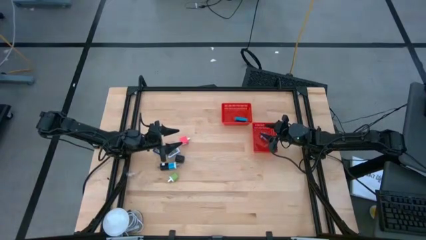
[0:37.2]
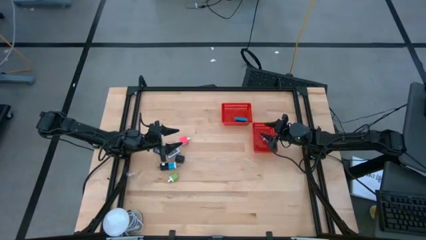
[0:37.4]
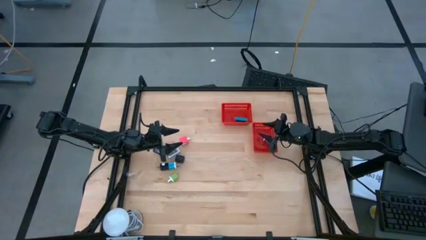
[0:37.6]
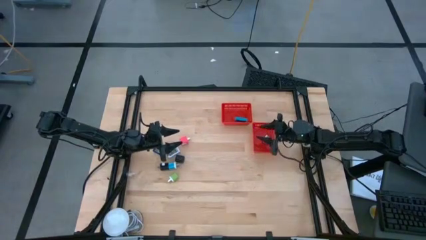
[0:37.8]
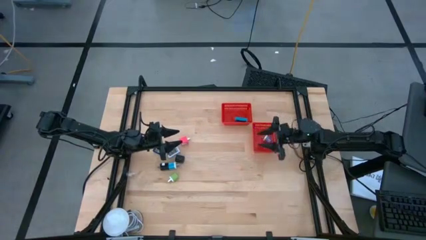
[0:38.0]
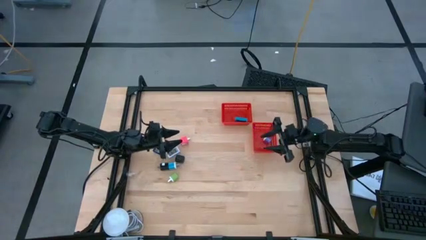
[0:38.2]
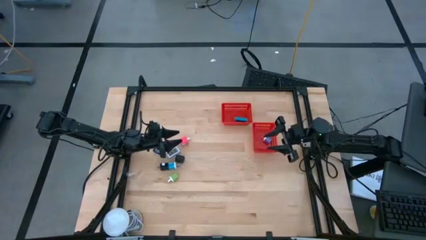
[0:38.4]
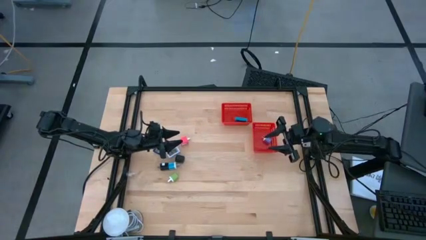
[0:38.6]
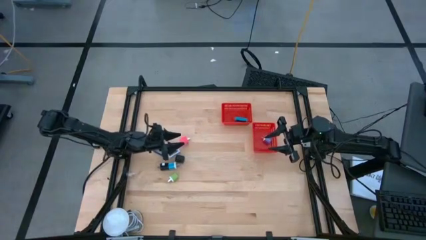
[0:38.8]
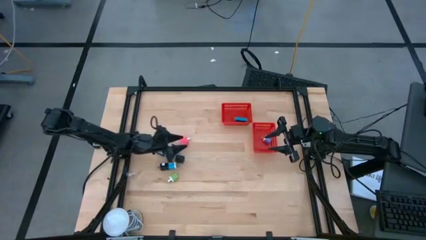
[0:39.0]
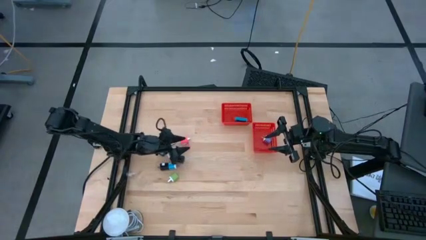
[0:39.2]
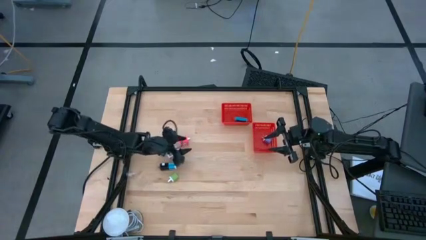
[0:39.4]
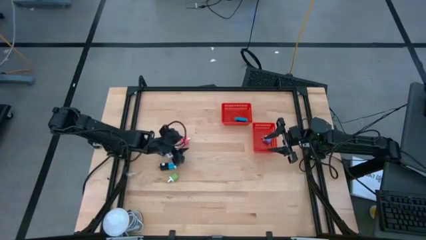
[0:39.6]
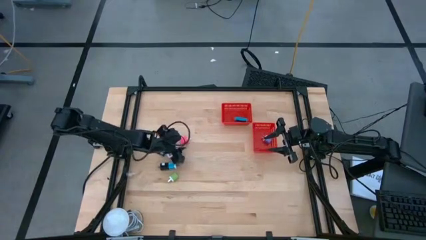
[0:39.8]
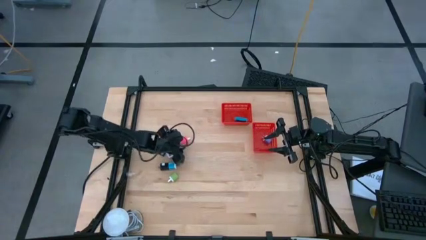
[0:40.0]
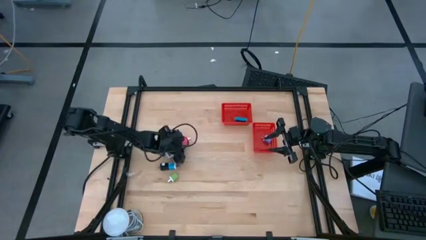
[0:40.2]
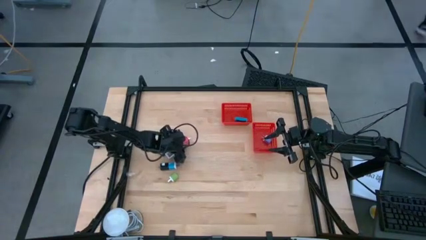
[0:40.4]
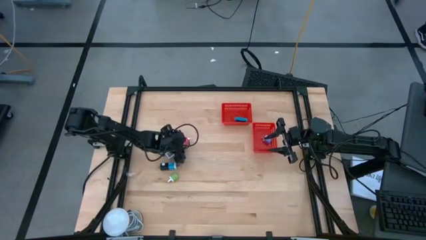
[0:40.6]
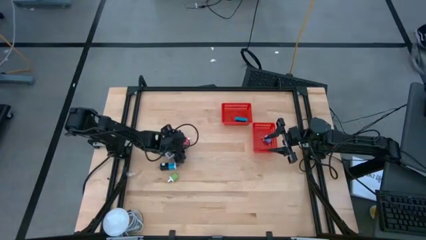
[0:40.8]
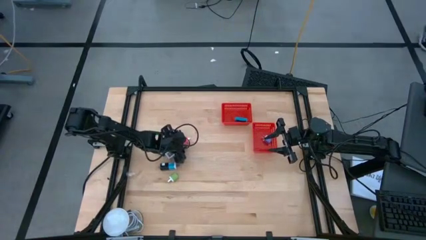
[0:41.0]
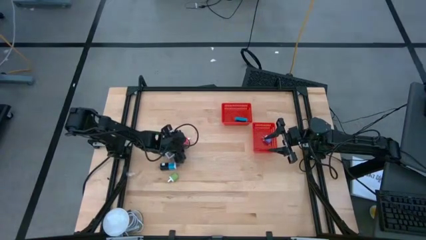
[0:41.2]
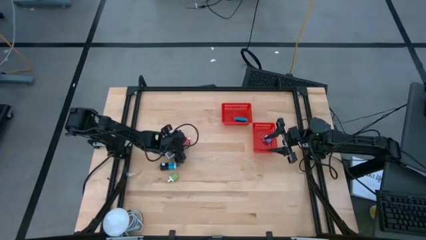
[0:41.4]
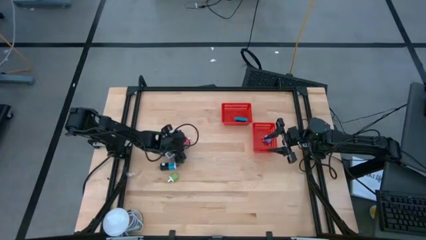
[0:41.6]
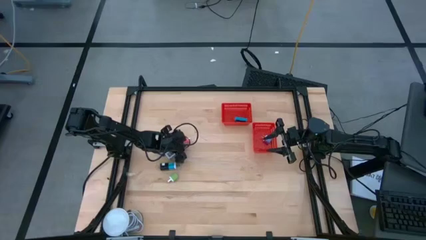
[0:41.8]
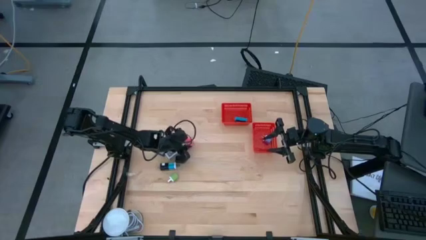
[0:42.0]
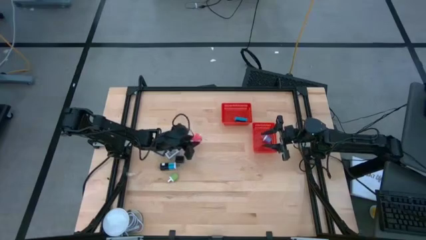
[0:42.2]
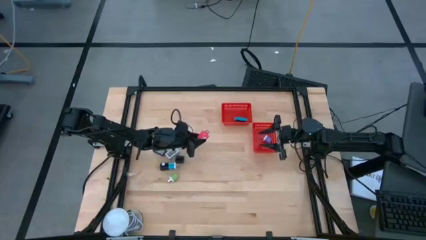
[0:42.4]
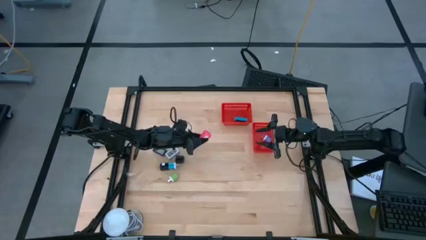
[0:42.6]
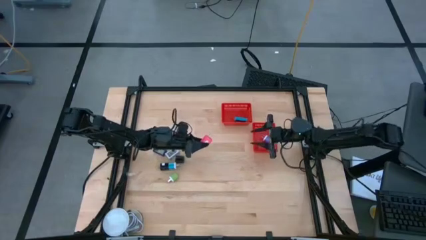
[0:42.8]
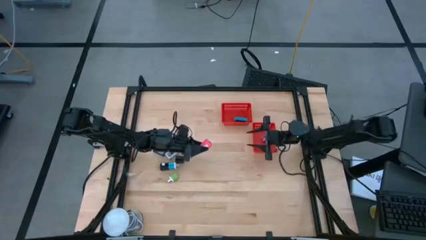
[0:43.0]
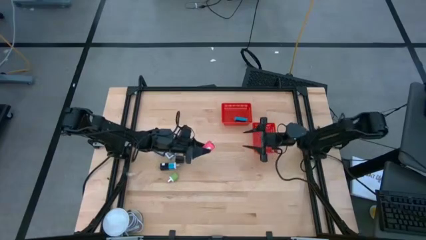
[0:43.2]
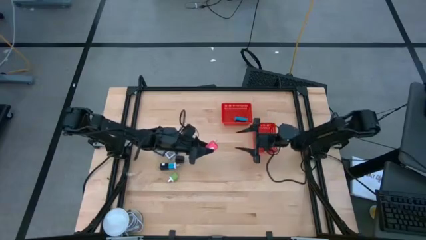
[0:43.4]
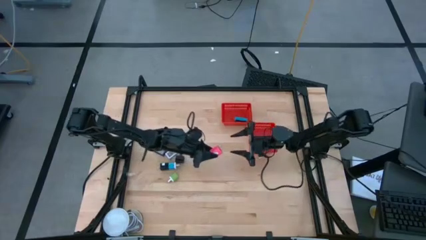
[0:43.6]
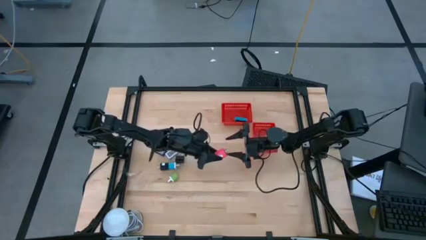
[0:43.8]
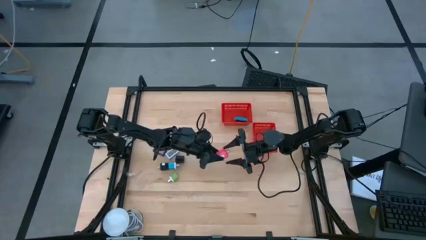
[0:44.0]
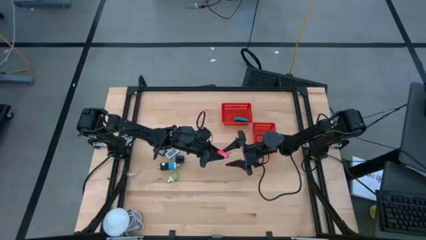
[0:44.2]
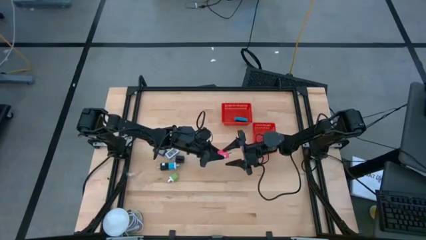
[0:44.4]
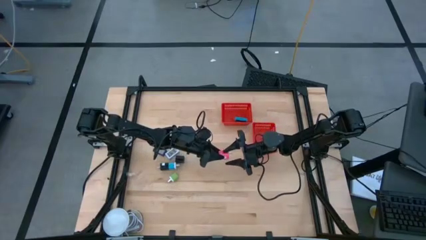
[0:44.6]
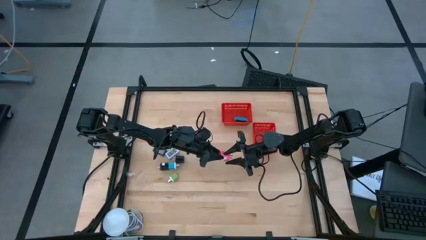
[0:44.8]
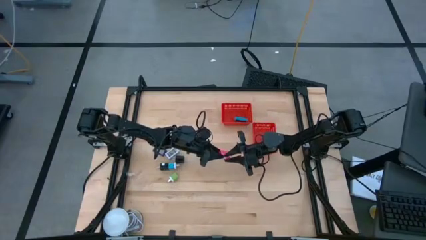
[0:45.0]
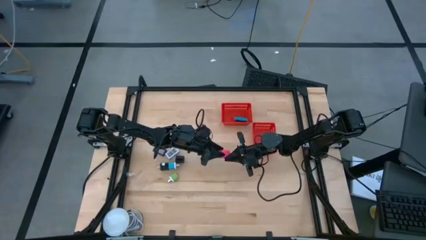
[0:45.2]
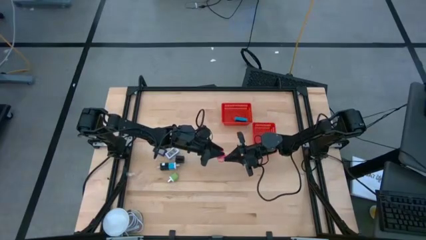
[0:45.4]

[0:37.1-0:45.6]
Task: Pick & Place Office items
Put the pink charger adapter into the bottom red bin

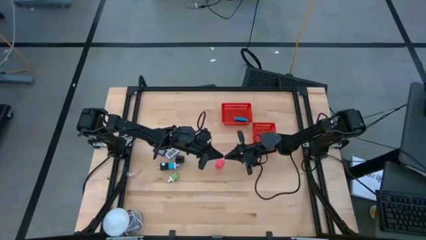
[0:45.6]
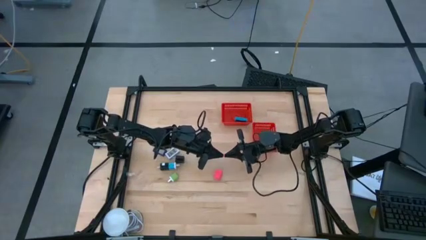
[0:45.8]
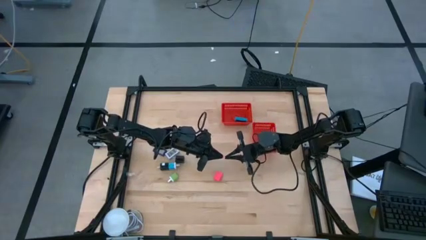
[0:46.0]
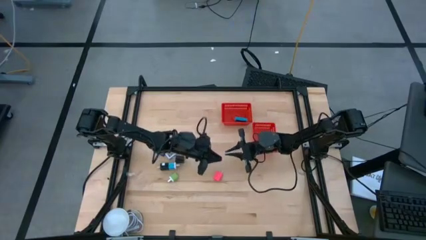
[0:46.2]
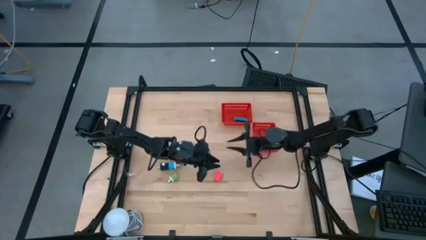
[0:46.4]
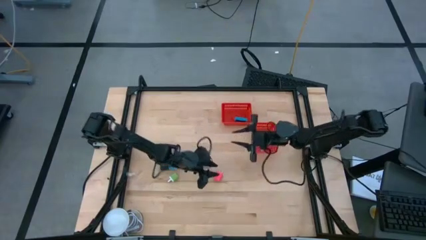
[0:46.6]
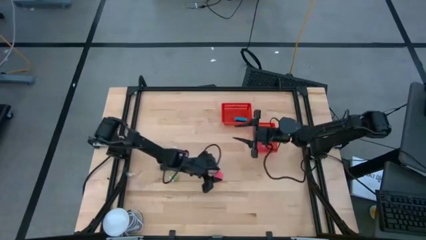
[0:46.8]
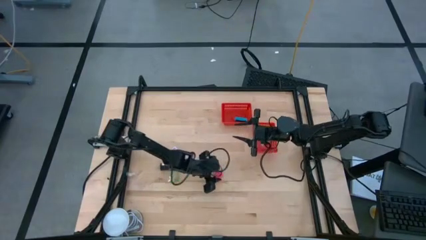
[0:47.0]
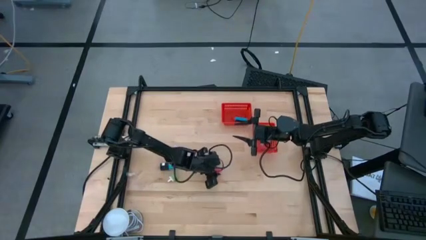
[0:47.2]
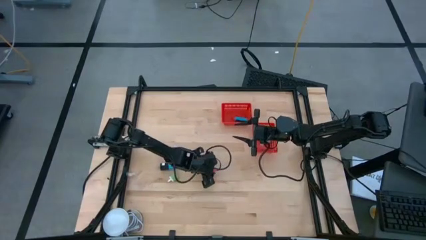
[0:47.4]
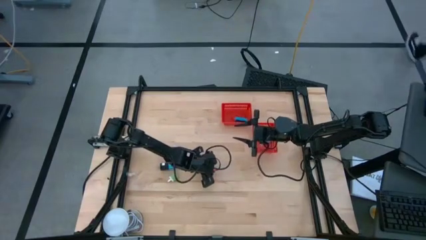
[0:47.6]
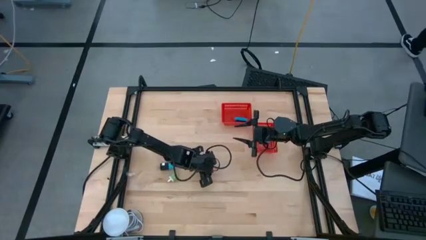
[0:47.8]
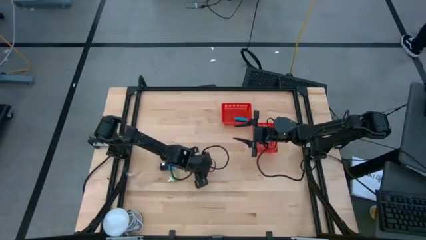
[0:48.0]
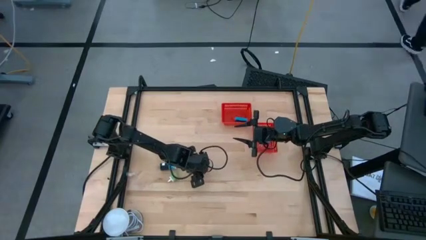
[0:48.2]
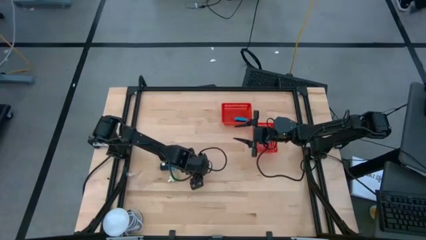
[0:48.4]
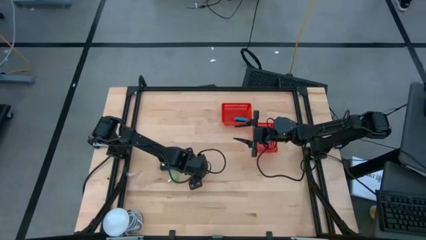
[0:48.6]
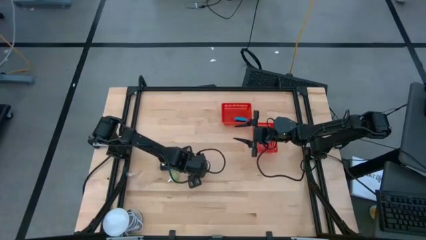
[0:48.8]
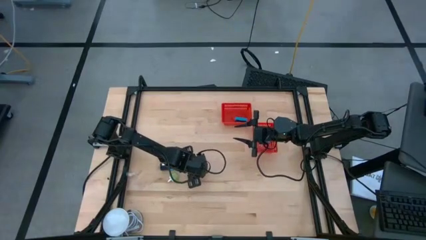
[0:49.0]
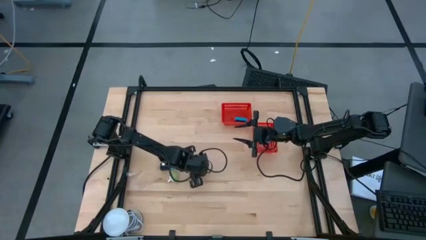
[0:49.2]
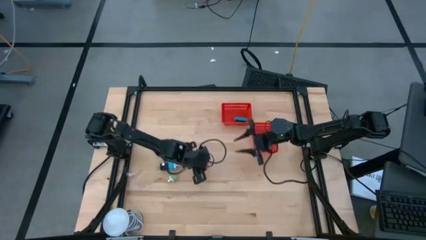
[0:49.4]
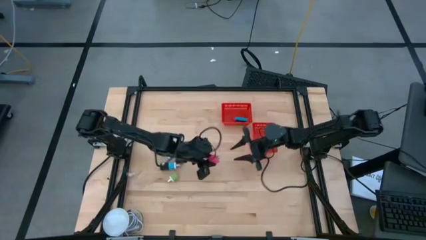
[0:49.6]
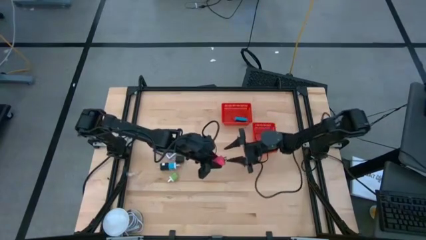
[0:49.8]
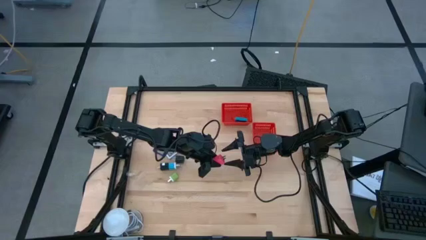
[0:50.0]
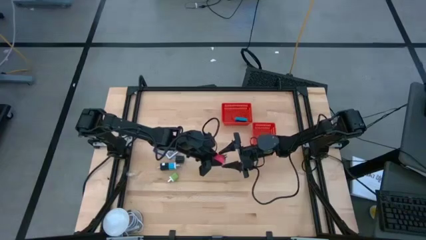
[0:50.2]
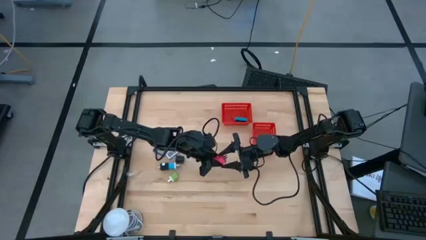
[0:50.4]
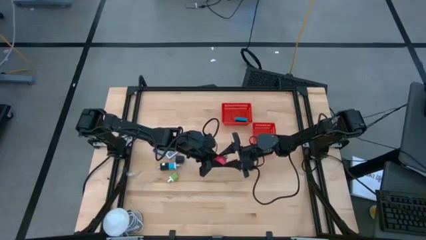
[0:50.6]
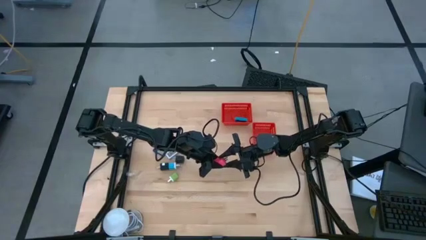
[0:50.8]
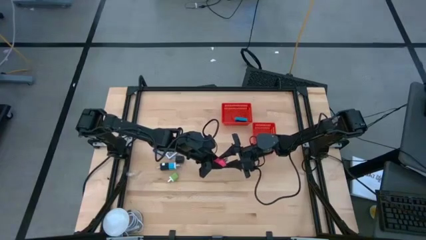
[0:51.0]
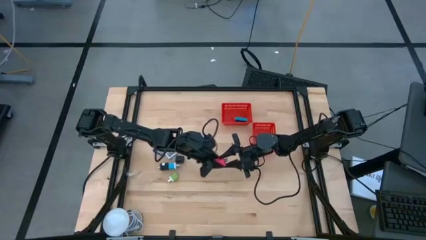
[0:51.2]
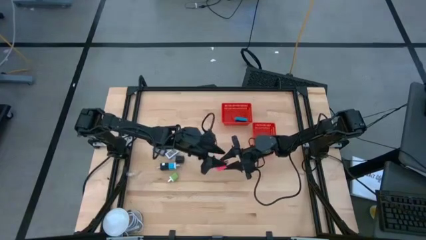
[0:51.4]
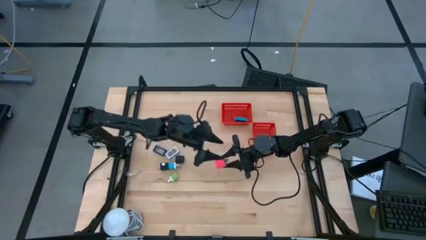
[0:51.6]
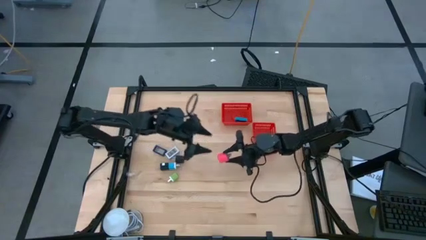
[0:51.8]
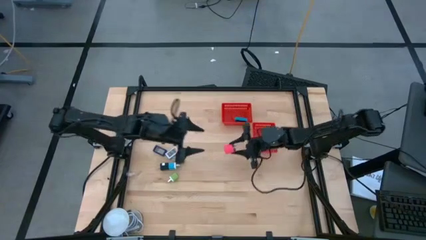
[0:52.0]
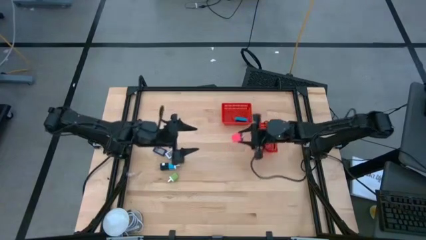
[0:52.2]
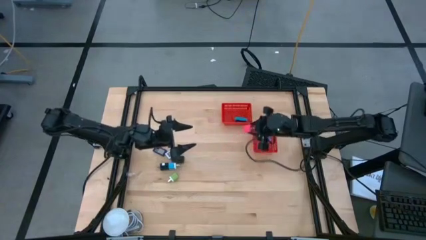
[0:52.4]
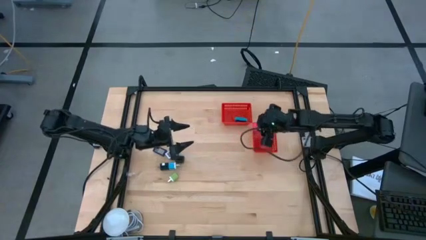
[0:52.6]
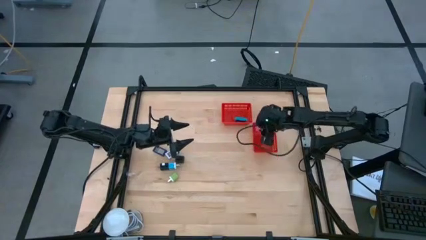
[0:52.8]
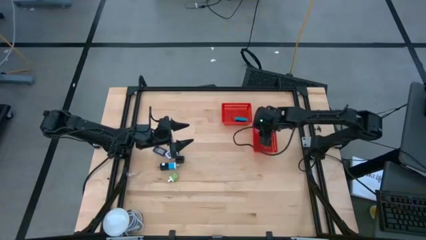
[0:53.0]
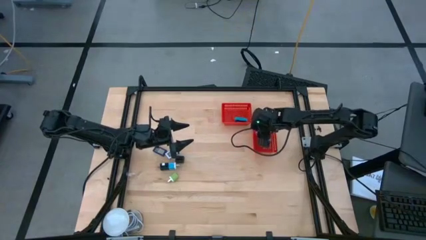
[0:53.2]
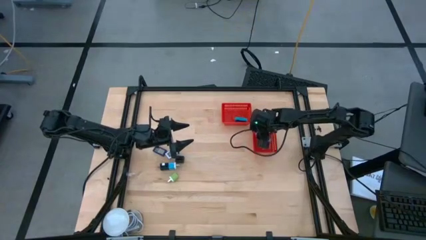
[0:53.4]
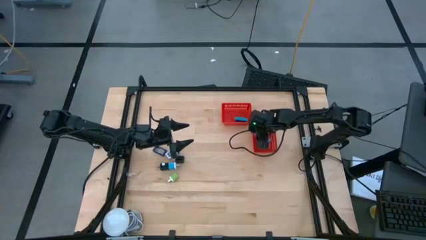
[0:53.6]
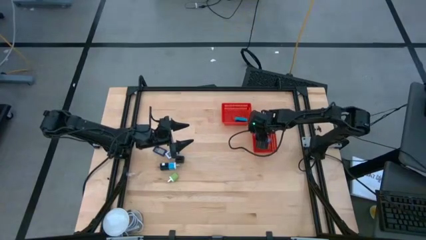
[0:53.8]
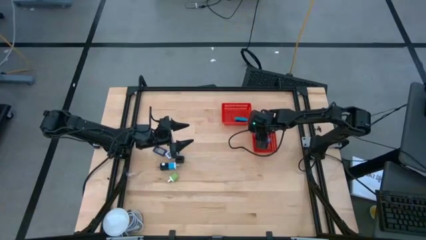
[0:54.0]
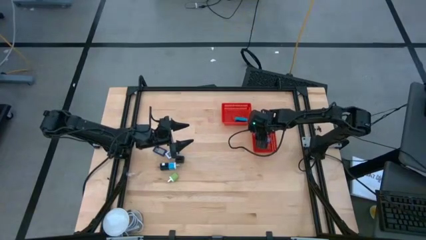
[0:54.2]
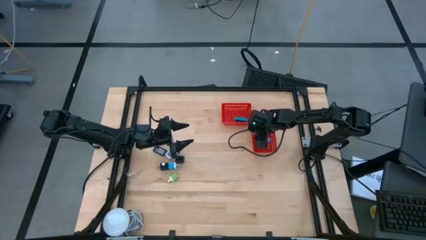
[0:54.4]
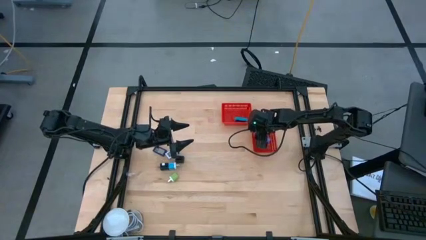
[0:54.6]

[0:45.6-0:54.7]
Put the pink charger adapter into the bottom red bin
